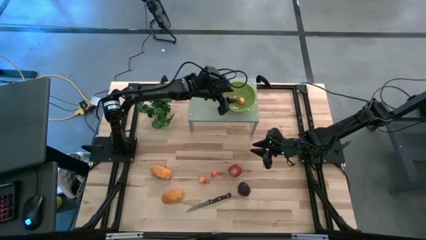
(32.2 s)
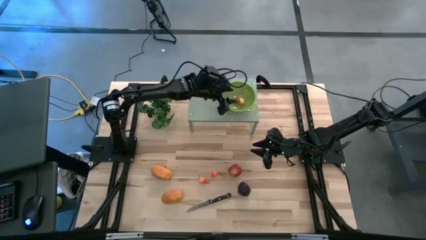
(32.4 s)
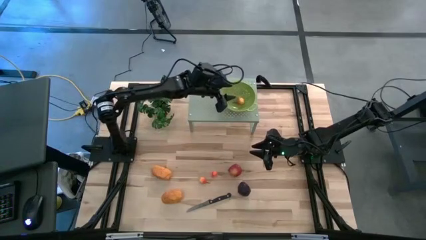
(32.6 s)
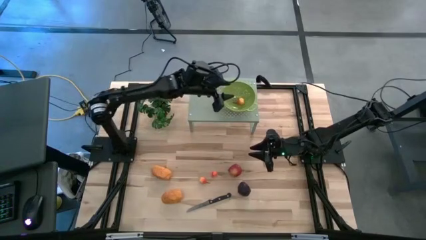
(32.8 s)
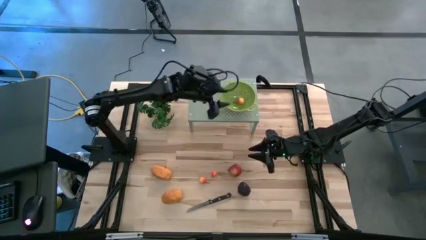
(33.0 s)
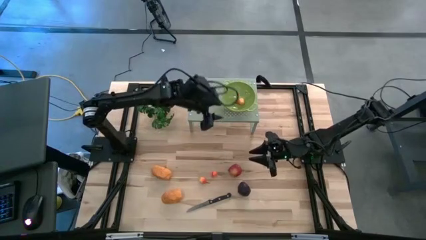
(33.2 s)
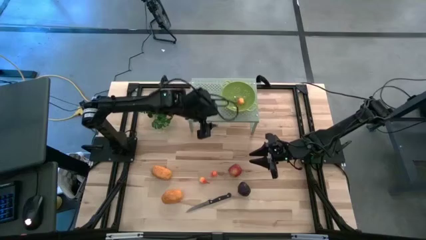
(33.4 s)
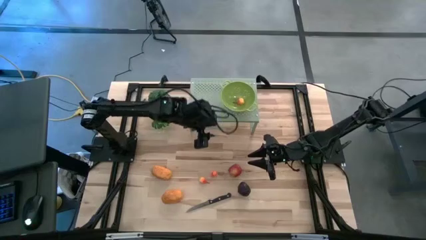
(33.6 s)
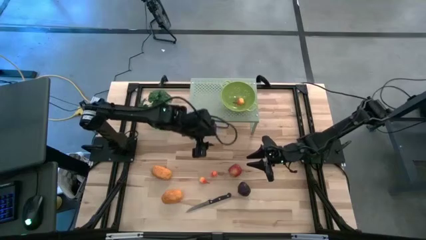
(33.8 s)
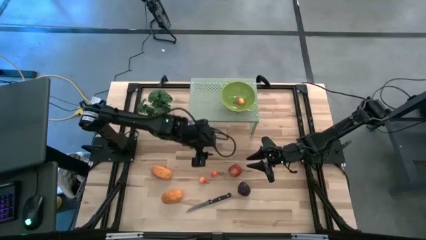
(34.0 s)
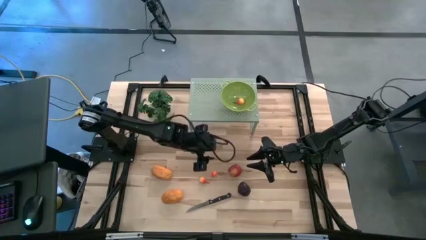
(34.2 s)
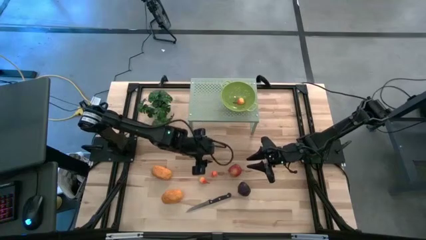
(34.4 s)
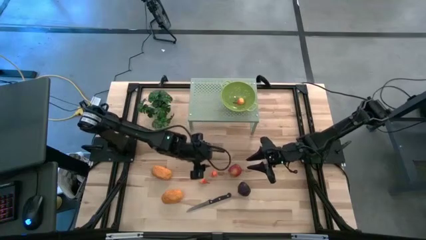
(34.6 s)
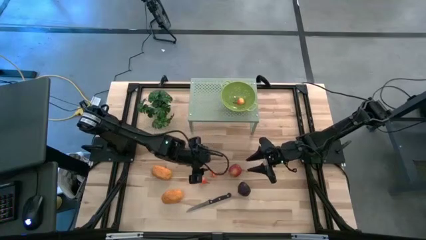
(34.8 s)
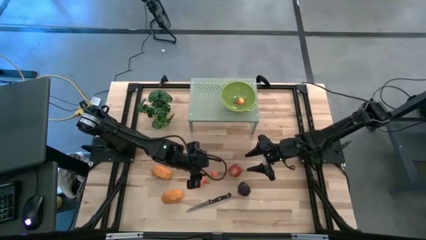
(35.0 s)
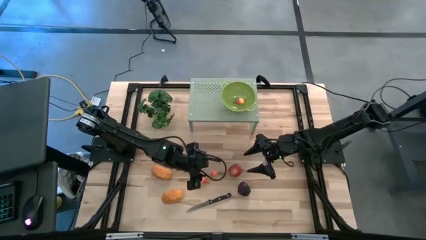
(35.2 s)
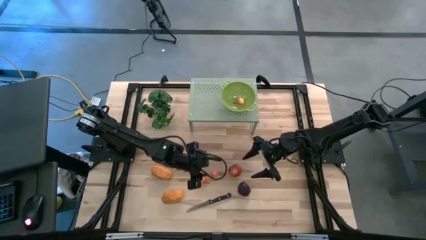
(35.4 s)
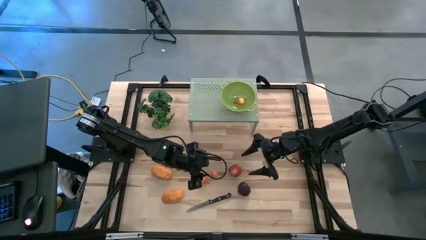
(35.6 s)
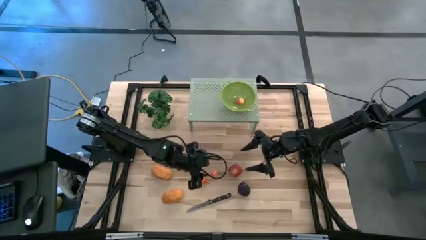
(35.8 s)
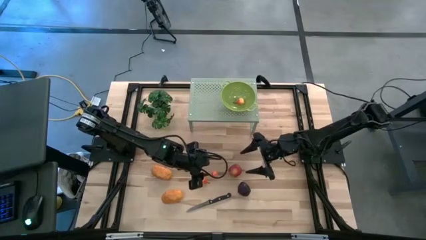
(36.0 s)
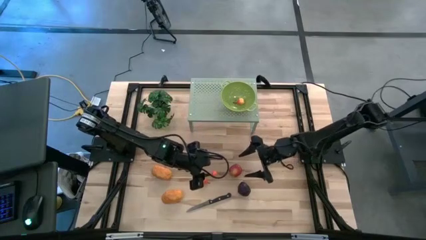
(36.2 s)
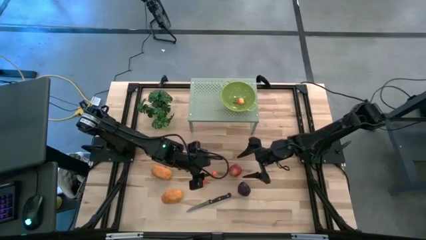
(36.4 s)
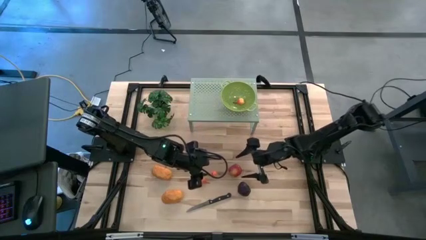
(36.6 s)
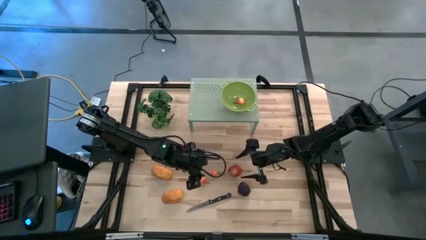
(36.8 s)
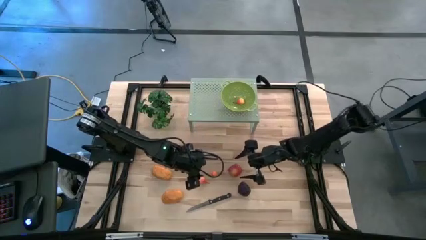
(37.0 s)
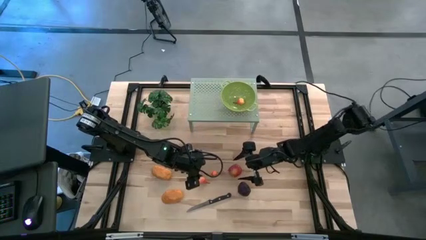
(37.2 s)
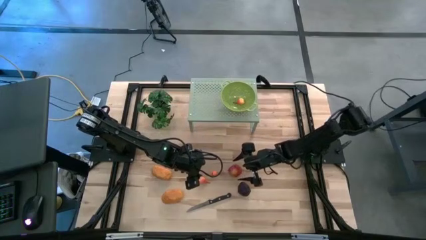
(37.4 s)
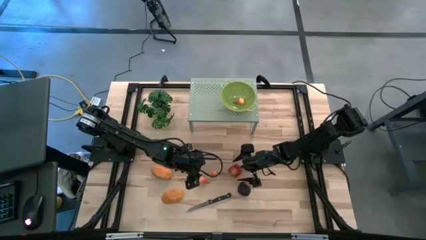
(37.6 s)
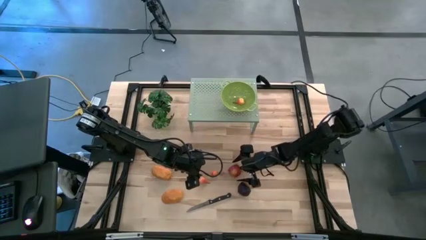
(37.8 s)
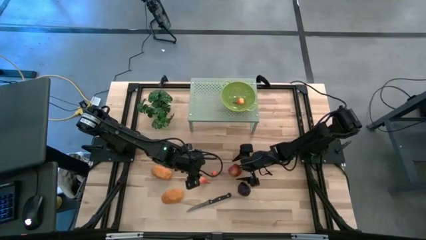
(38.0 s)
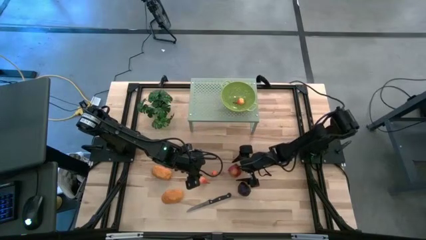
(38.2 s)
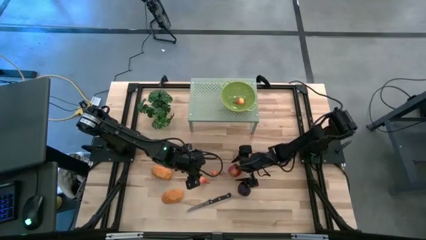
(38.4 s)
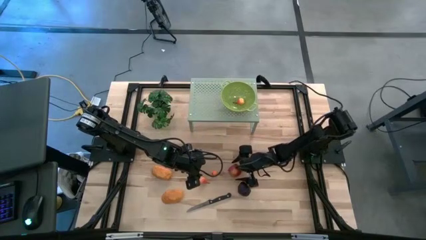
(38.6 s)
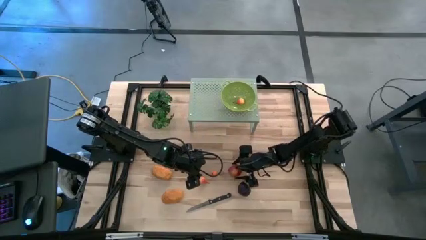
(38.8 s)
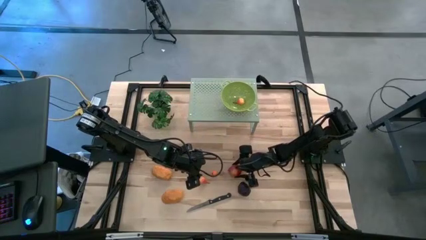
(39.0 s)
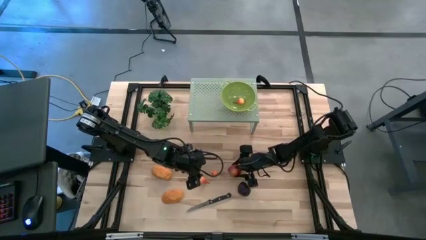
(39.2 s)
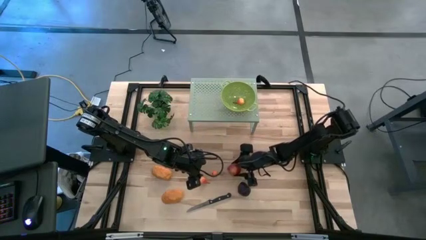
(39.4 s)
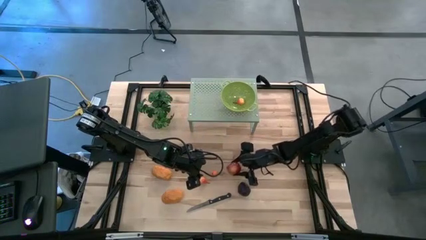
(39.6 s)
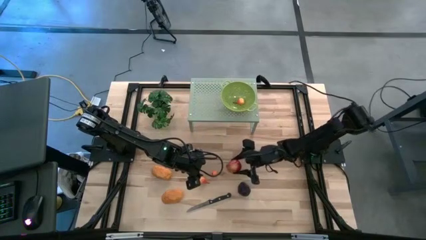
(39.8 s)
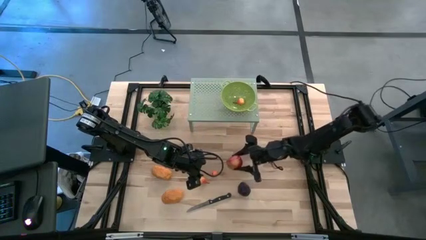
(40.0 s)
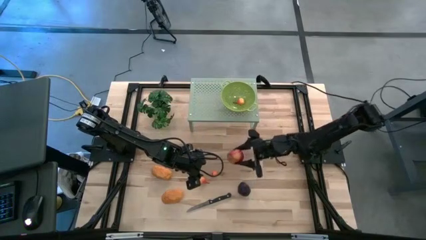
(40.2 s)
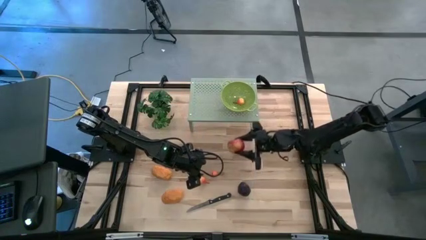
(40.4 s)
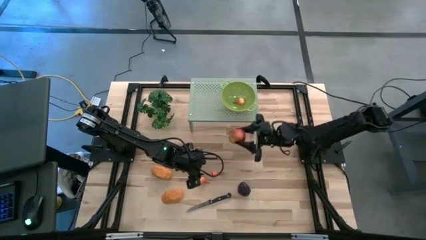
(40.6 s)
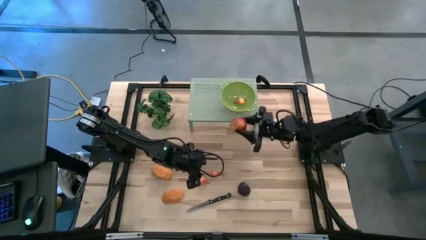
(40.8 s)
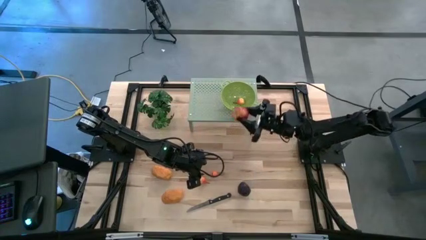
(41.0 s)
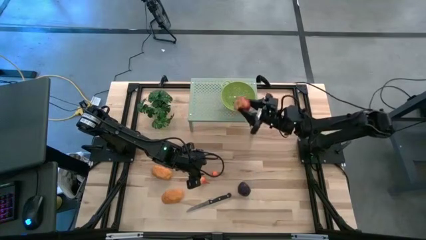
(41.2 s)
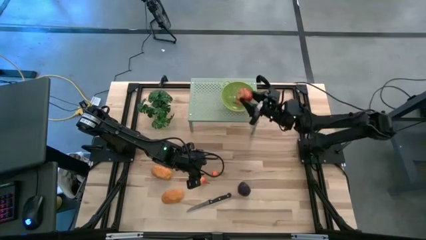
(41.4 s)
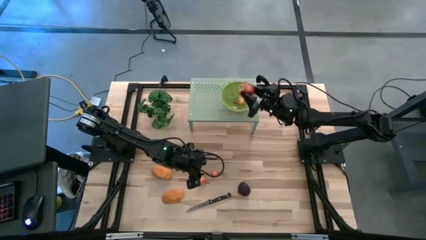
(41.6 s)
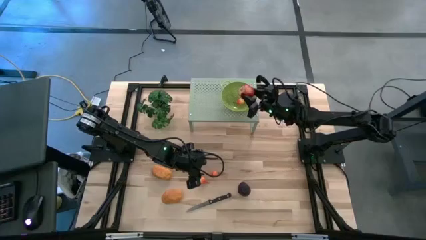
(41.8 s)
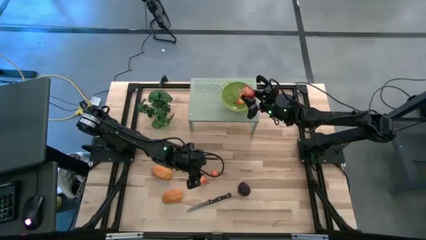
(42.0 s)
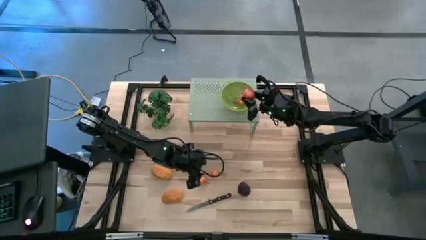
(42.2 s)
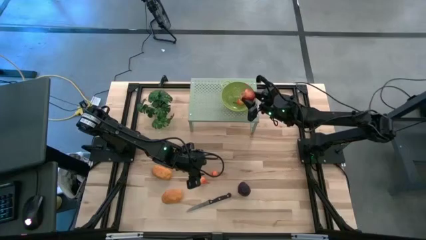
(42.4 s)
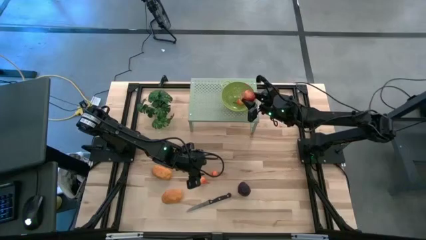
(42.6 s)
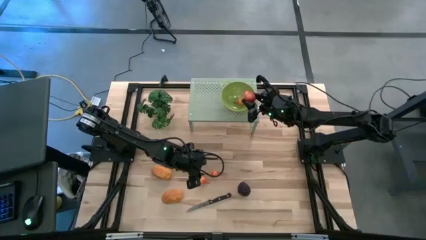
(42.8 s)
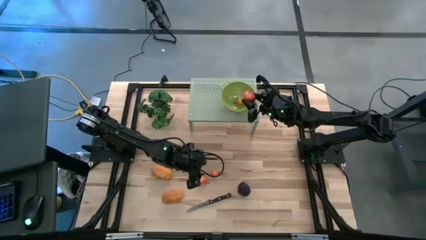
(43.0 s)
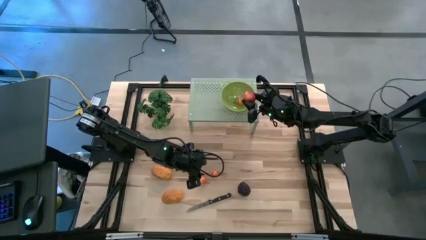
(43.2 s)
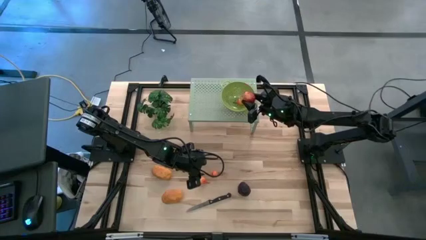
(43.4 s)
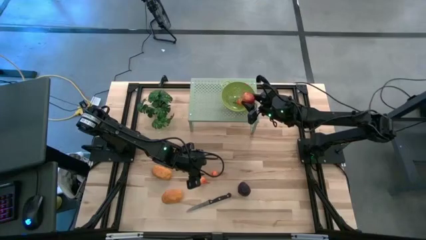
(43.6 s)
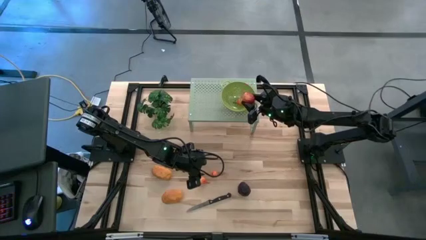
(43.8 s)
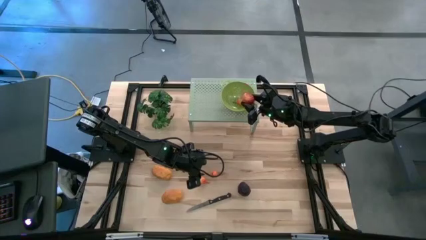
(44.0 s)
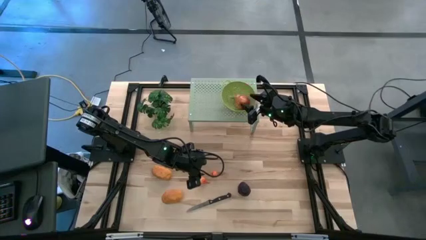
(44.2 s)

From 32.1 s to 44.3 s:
Task: Pick & Place Fruit
Put the apple into the strainer bowl on the shelf
